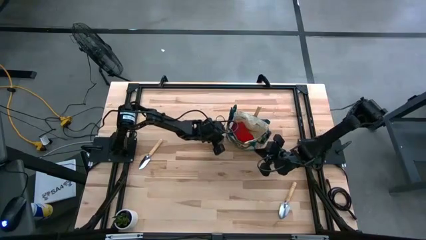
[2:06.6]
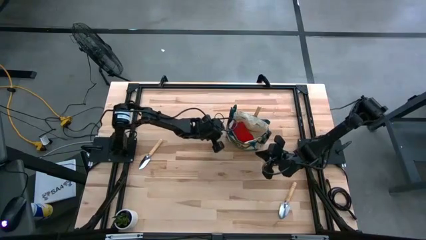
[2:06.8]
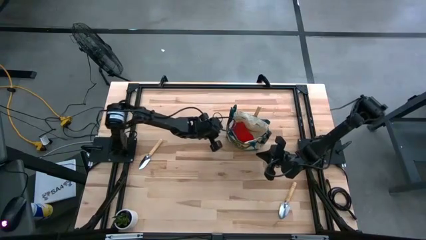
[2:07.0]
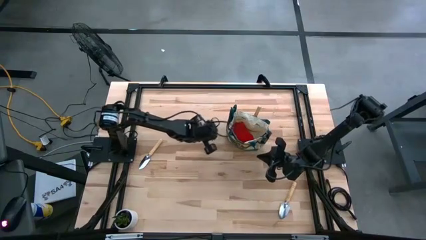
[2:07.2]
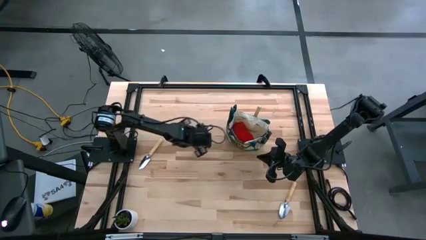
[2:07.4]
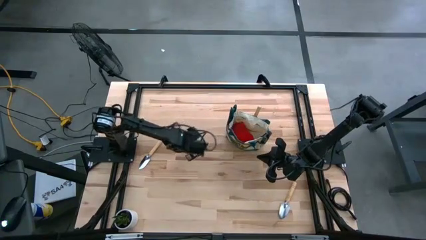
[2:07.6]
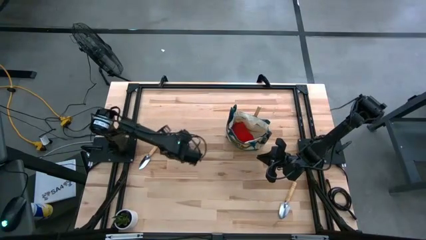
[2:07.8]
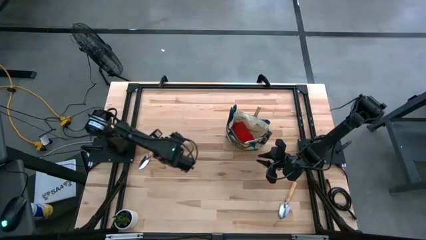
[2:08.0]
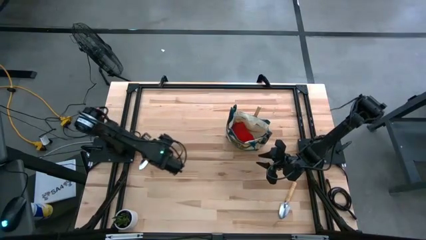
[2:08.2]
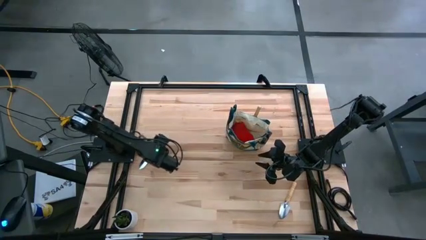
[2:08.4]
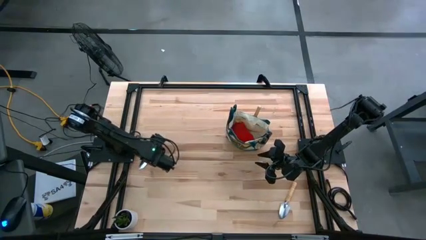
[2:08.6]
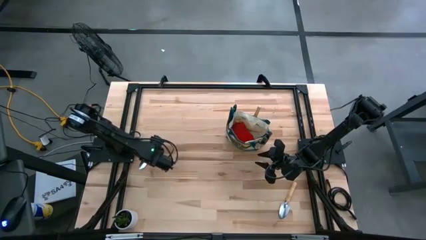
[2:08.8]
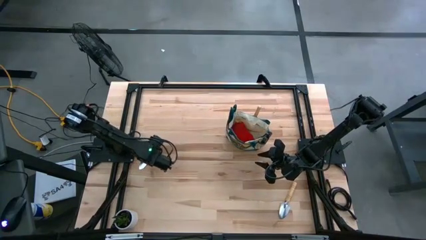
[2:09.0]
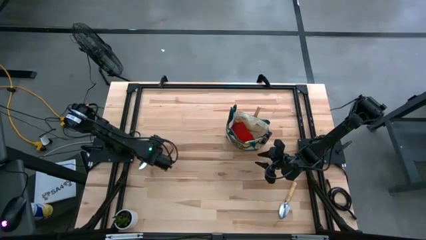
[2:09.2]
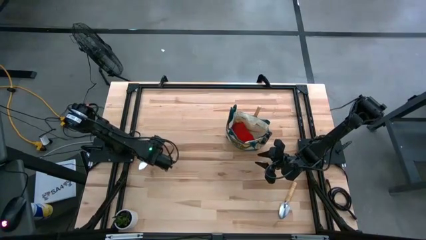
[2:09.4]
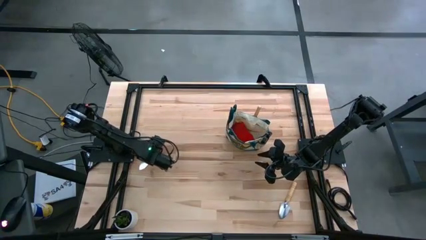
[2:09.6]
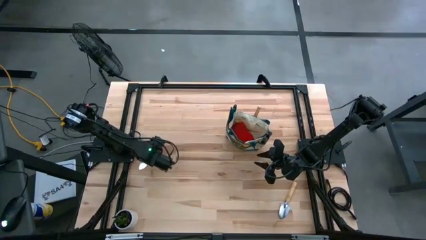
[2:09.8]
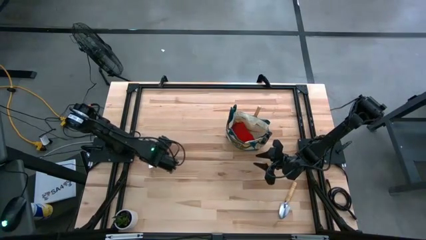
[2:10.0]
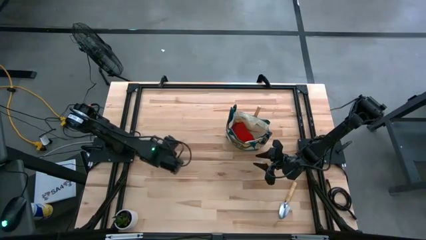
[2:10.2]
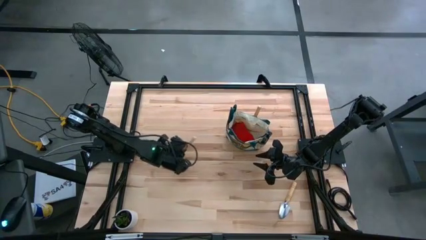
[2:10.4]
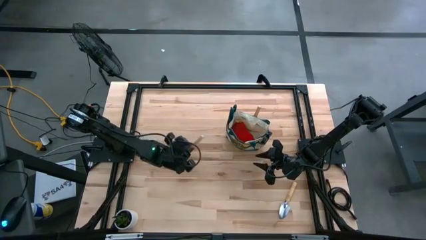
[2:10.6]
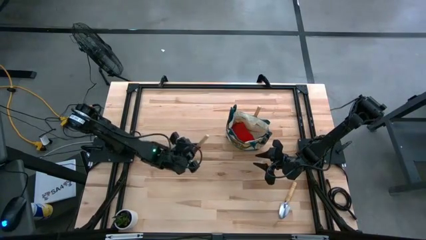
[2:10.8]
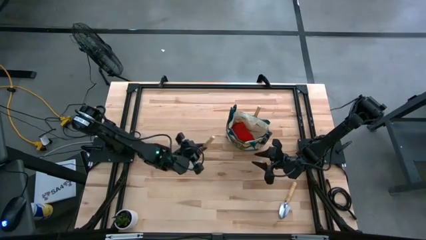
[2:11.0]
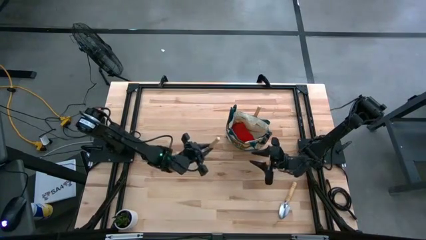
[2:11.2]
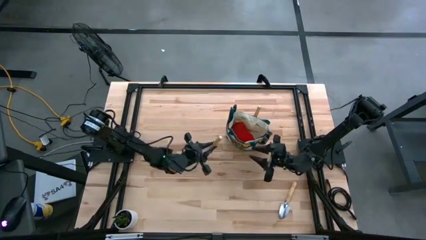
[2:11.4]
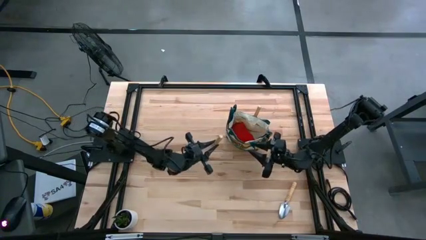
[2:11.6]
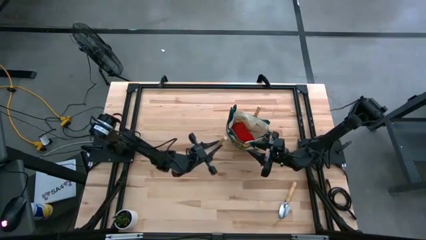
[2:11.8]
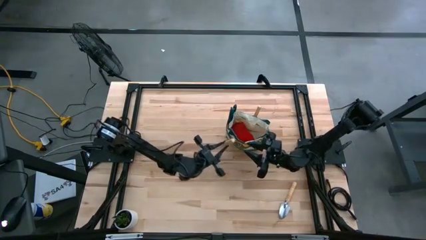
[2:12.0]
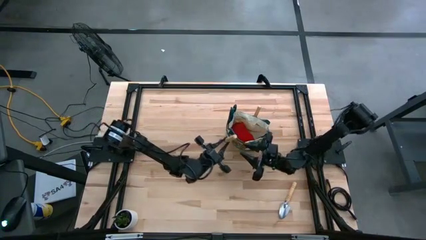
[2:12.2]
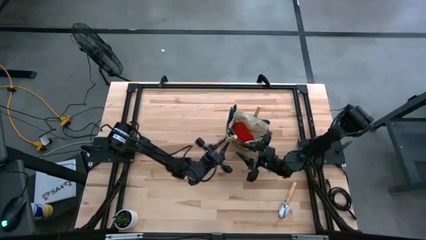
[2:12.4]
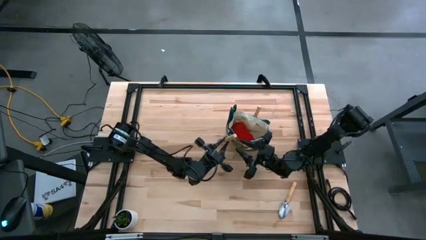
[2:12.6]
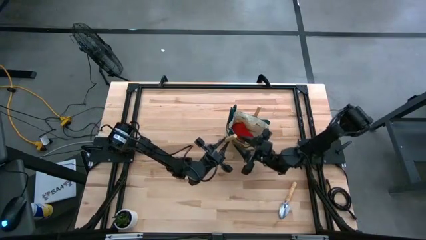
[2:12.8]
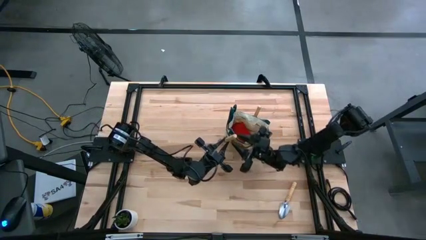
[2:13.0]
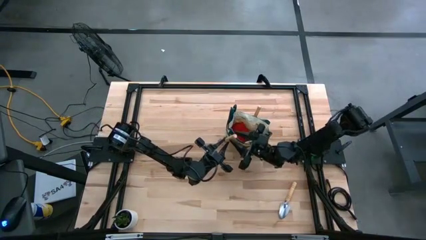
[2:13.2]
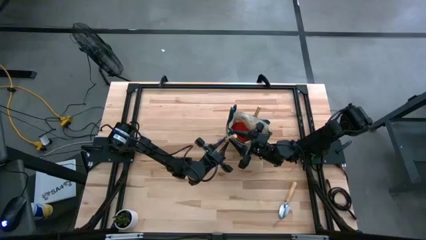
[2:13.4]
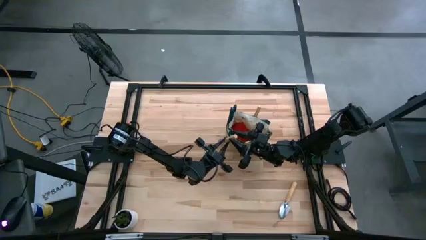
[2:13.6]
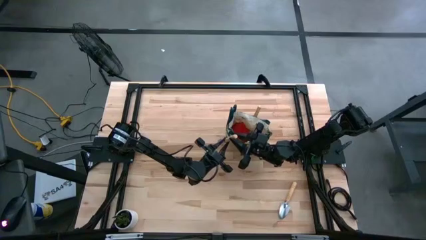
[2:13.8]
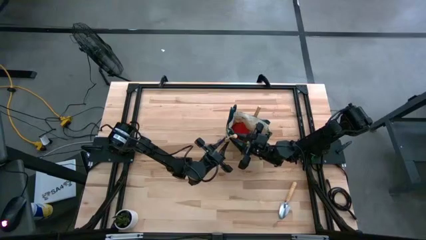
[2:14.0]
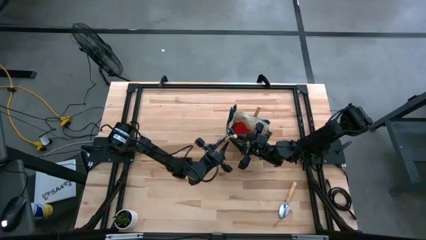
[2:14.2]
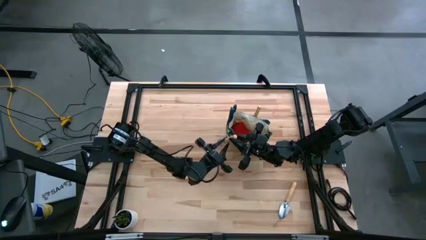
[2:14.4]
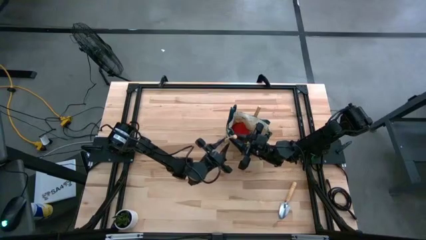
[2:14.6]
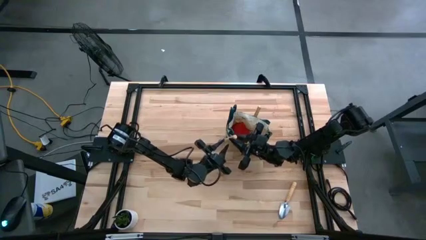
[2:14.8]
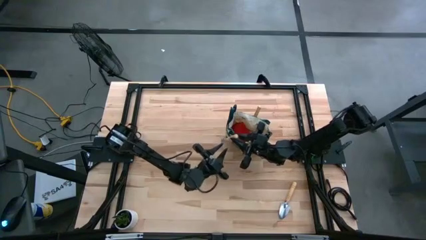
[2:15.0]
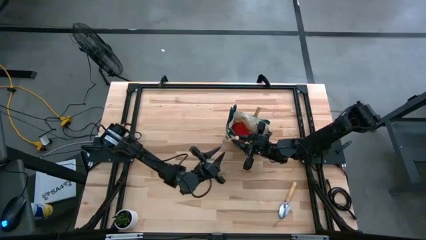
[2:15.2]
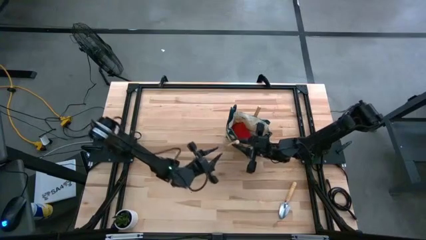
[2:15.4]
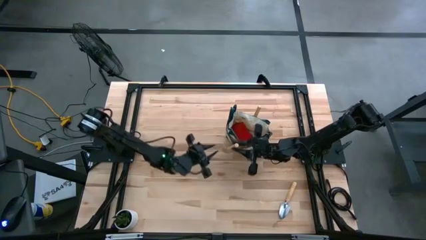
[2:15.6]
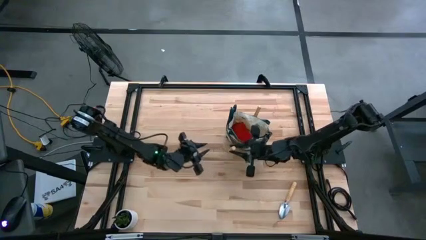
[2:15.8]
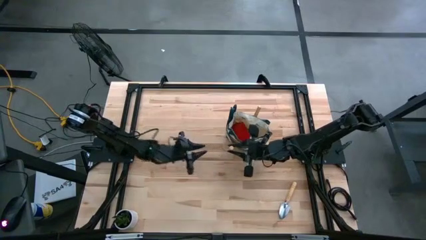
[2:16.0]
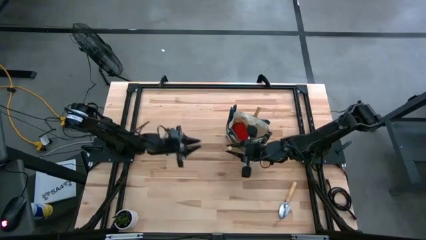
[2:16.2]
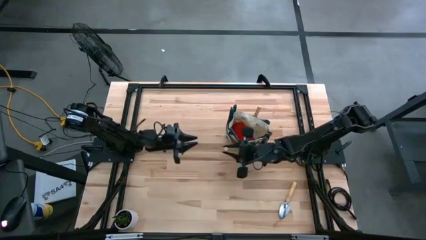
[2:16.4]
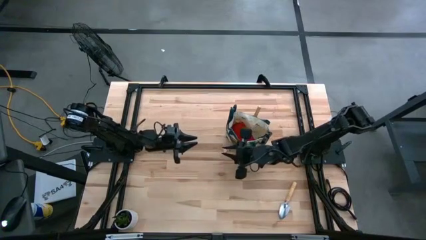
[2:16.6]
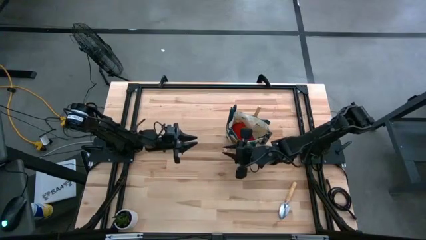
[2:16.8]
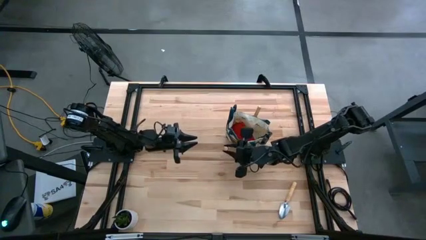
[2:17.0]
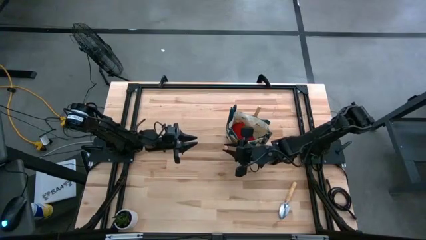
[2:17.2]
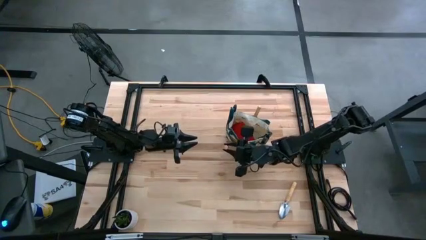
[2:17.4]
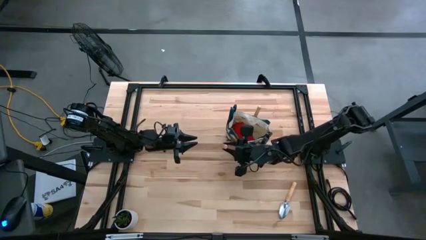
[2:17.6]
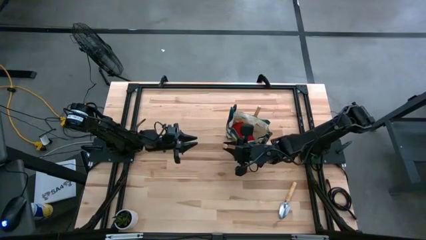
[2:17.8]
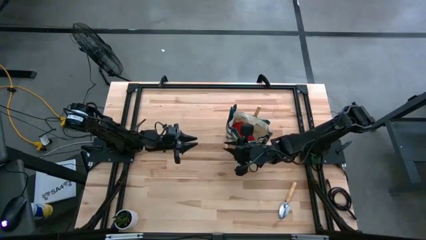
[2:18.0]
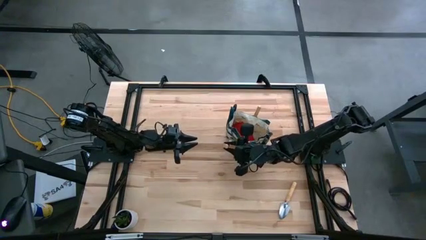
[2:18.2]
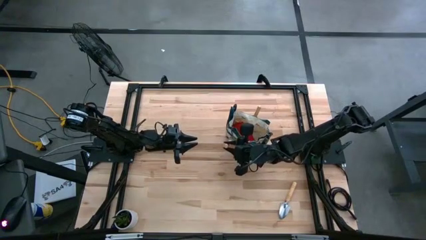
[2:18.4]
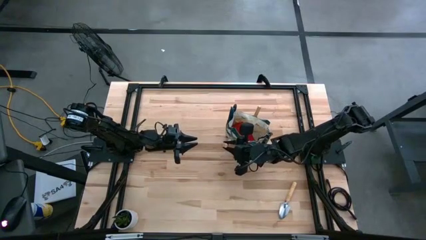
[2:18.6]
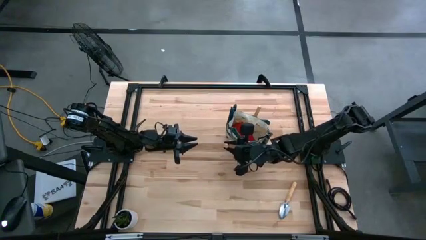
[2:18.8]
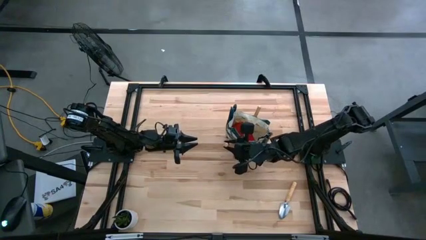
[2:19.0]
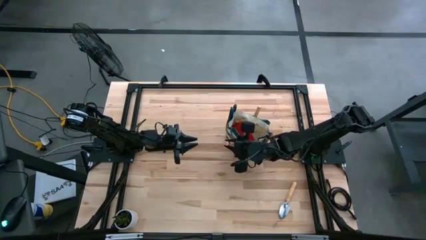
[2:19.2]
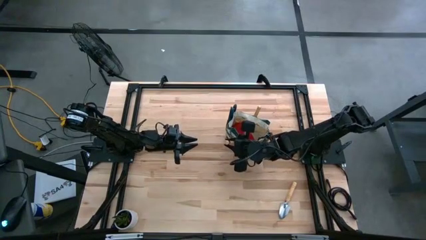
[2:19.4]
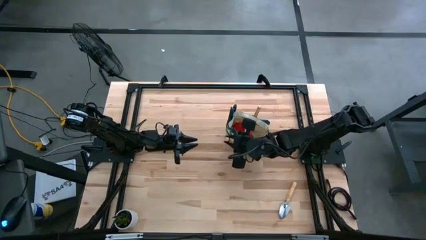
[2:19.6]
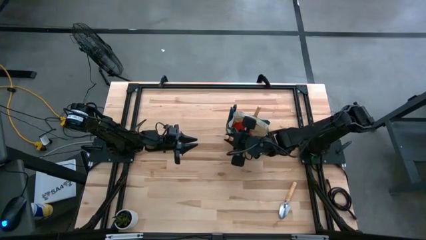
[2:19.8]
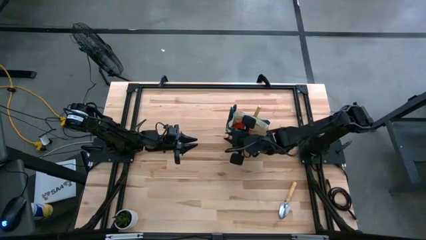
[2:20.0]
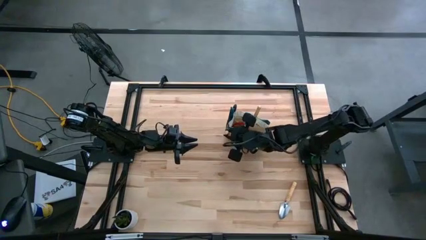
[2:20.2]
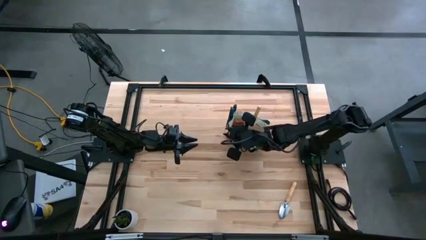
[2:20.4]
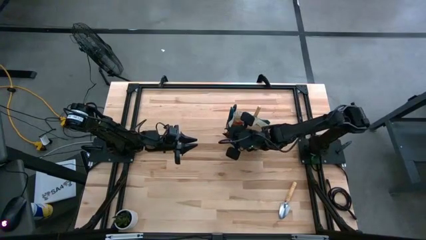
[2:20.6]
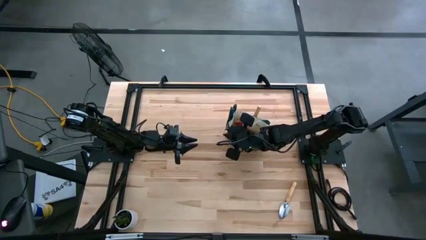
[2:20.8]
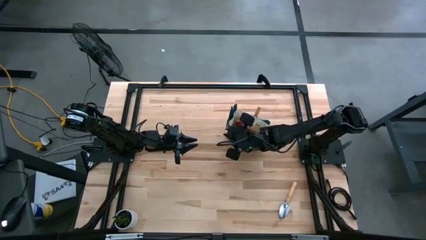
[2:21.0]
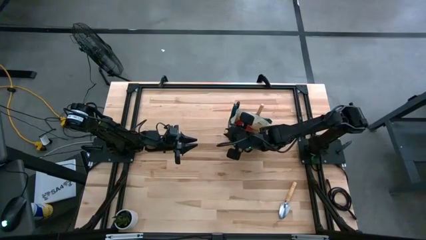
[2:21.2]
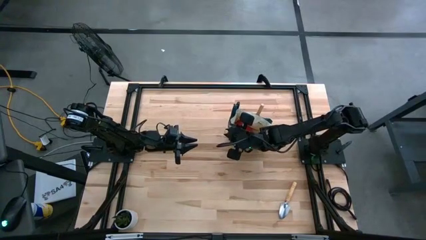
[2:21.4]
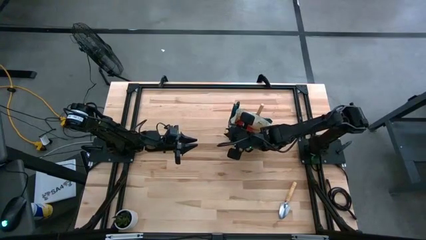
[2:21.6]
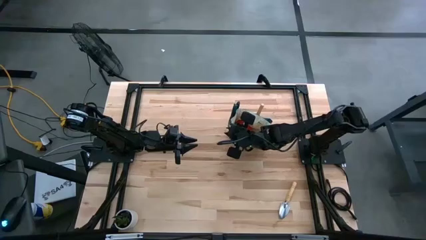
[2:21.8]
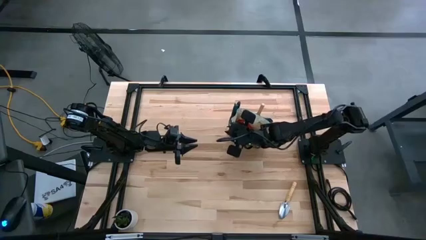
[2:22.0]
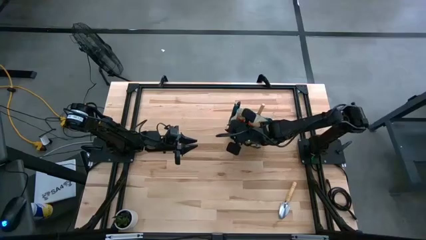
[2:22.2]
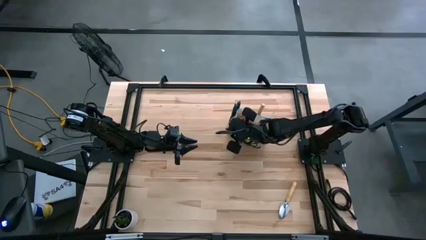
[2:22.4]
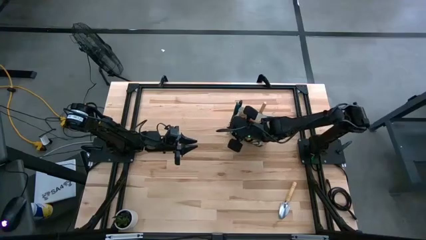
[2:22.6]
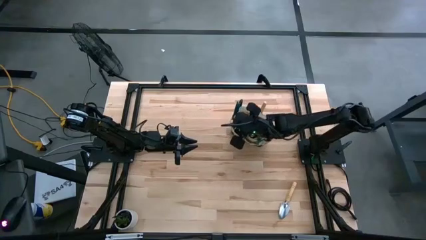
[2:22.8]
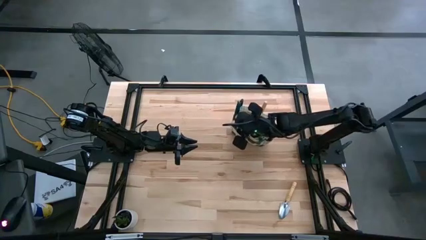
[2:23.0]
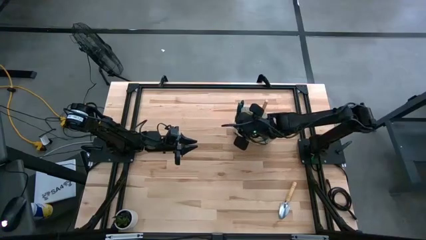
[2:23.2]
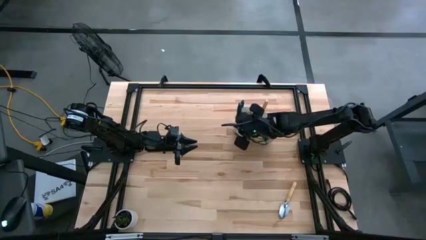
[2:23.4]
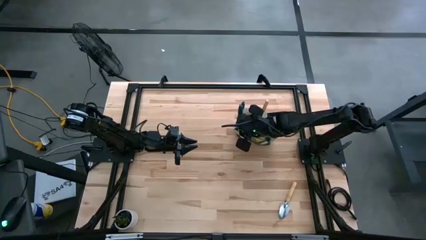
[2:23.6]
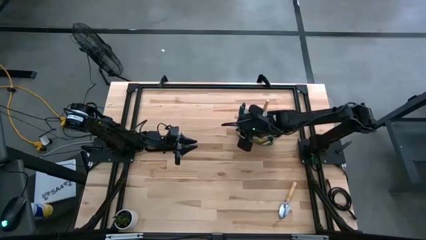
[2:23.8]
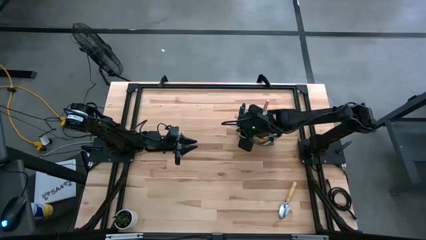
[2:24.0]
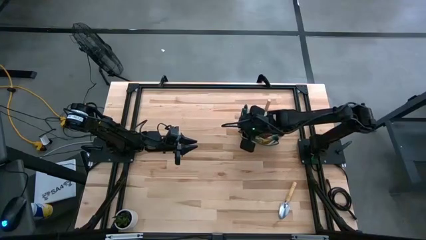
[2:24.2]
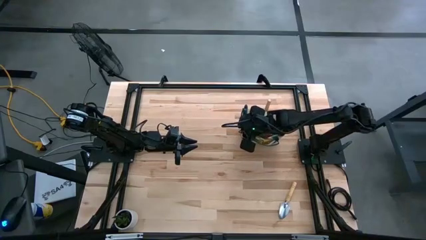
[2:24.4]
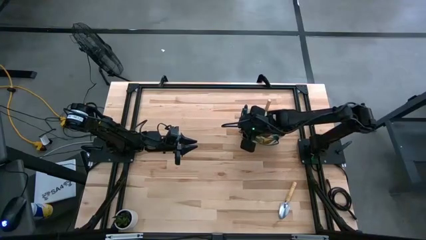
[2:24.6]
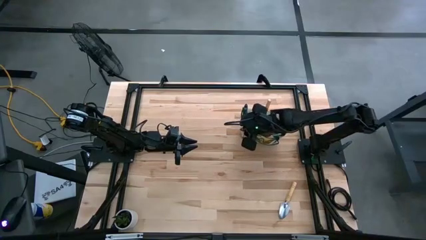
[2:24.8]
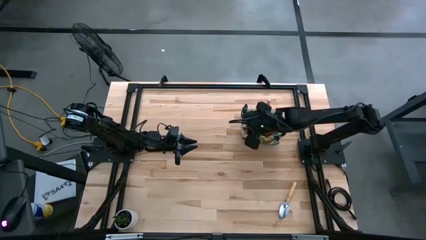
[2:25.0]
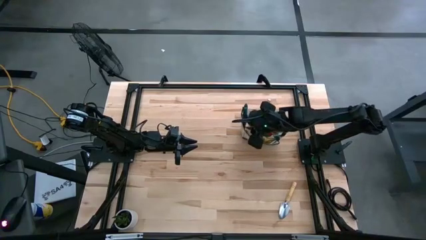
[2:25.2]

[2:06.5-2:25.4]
Task: Pick & Place Garden tools in Gardening bag
Put the left trowel into the gardening bag
